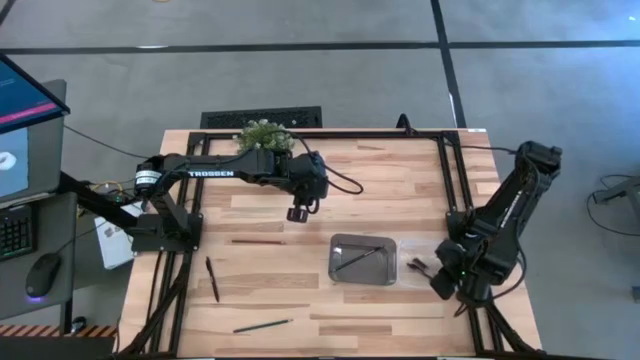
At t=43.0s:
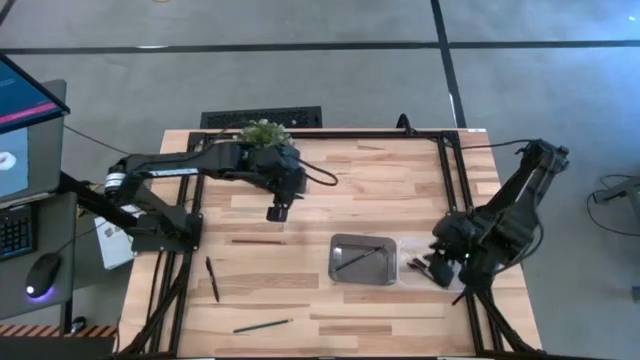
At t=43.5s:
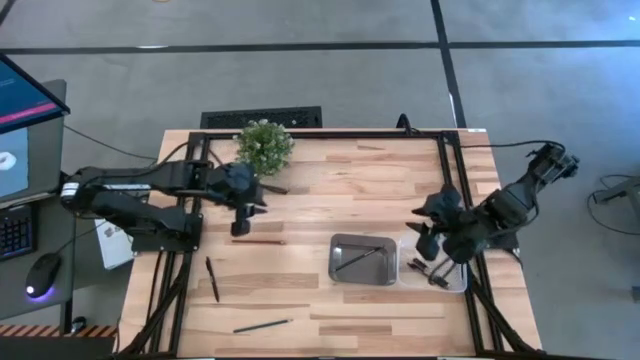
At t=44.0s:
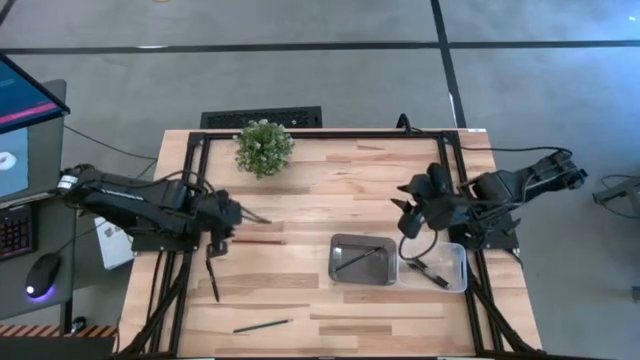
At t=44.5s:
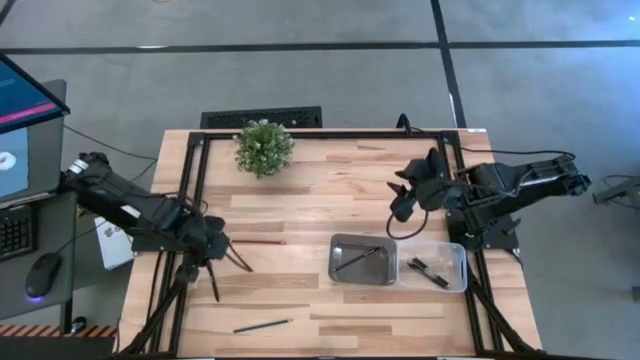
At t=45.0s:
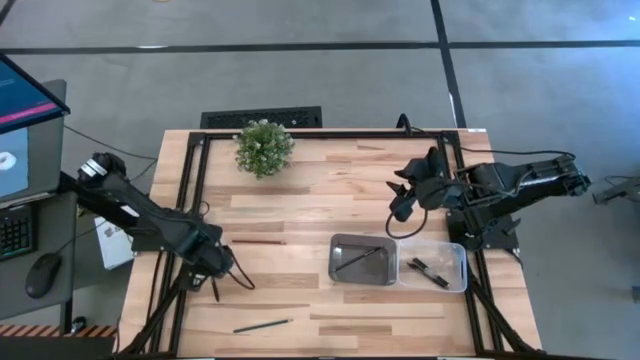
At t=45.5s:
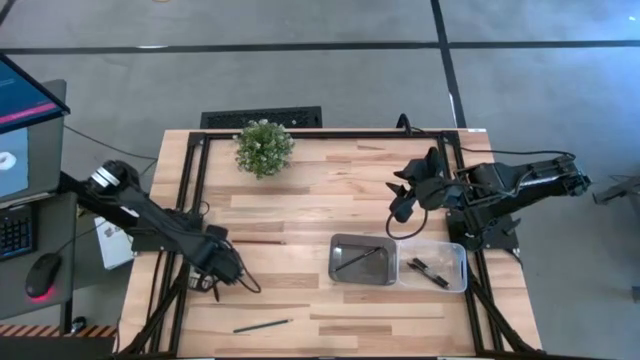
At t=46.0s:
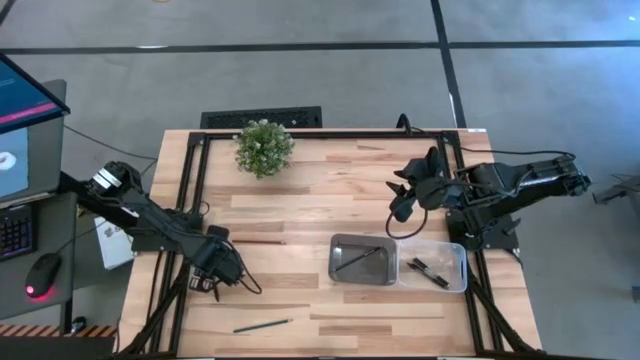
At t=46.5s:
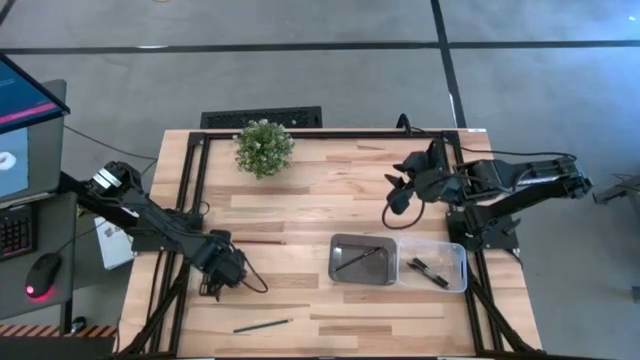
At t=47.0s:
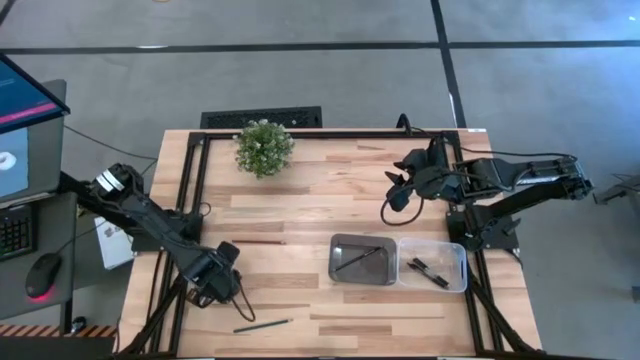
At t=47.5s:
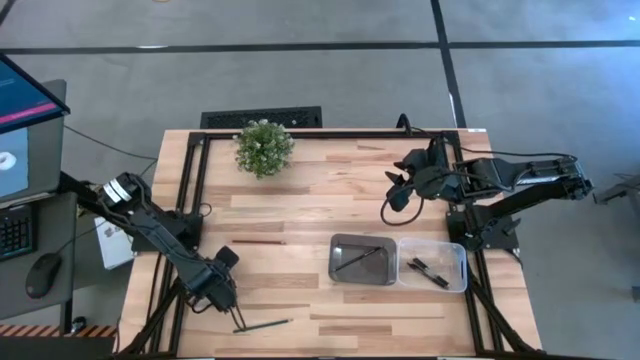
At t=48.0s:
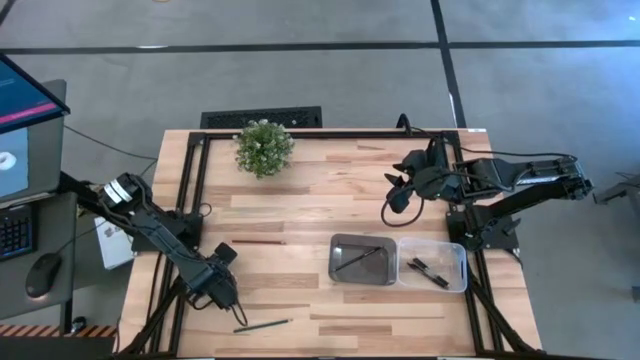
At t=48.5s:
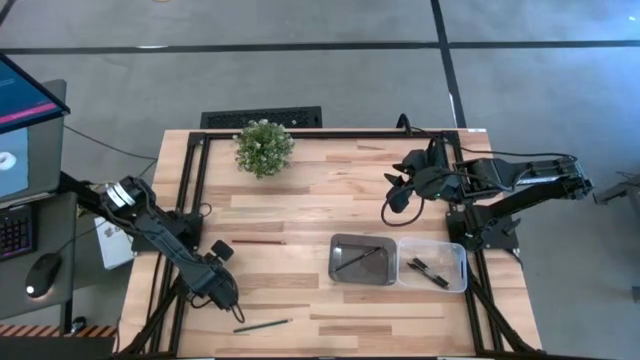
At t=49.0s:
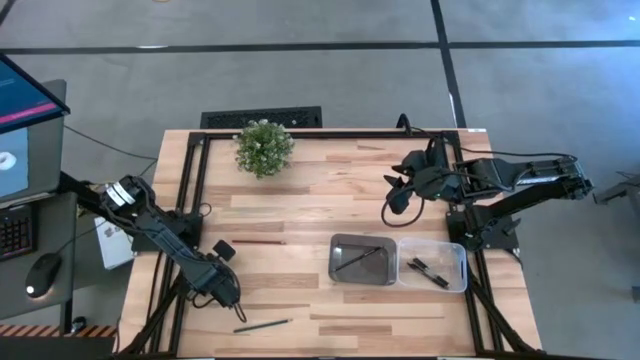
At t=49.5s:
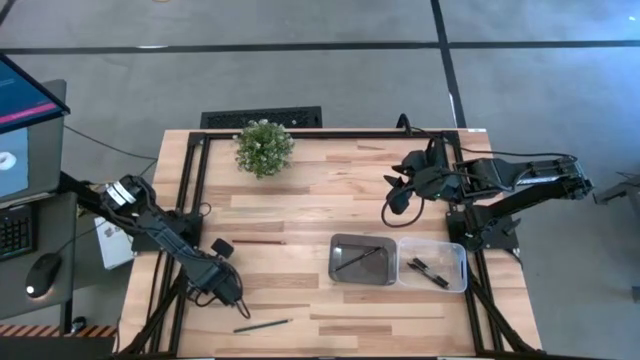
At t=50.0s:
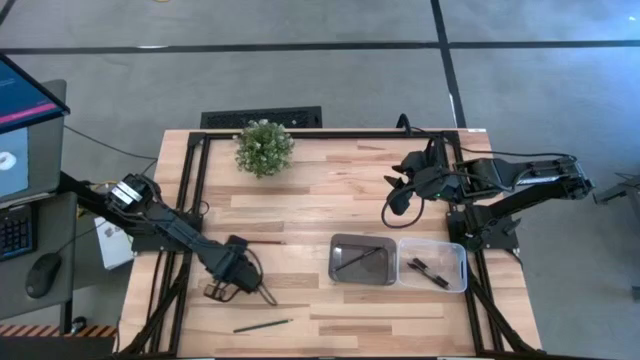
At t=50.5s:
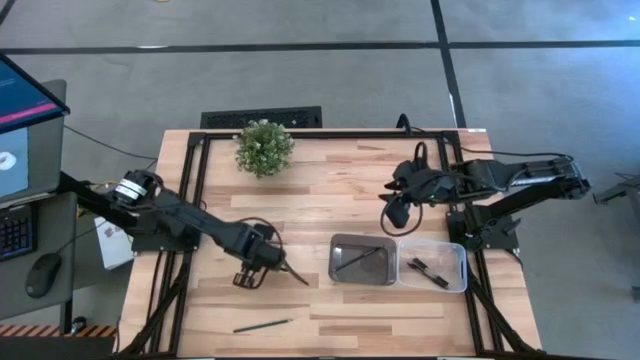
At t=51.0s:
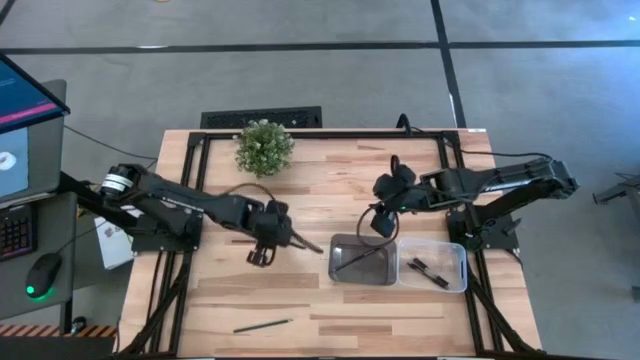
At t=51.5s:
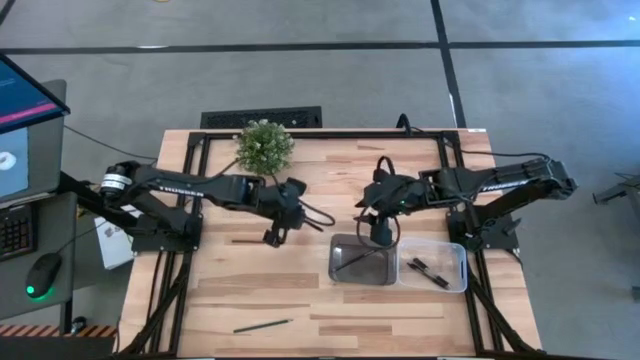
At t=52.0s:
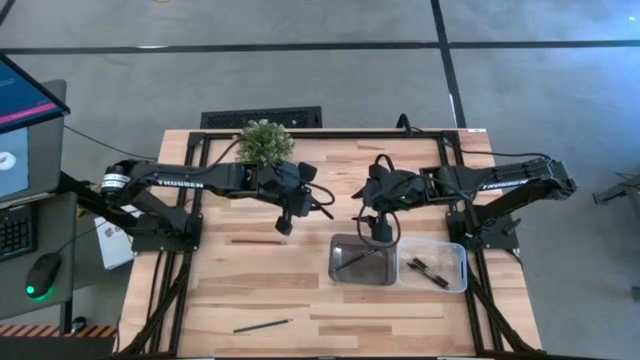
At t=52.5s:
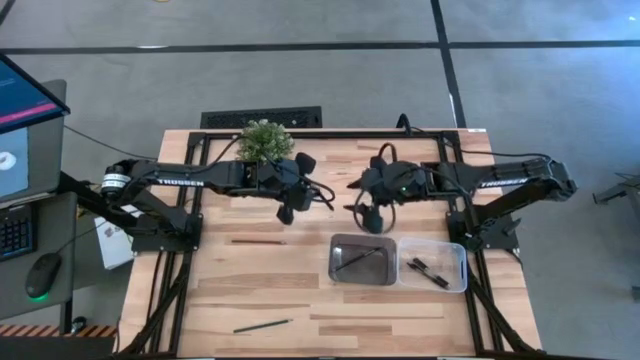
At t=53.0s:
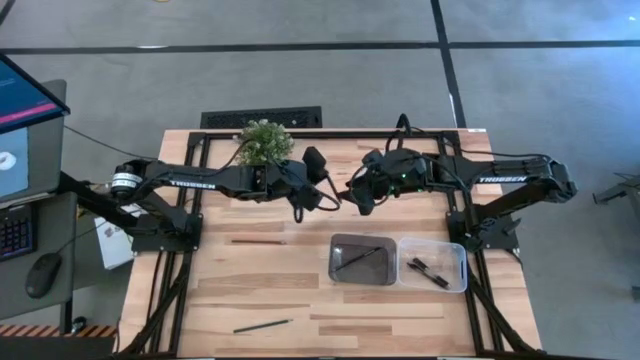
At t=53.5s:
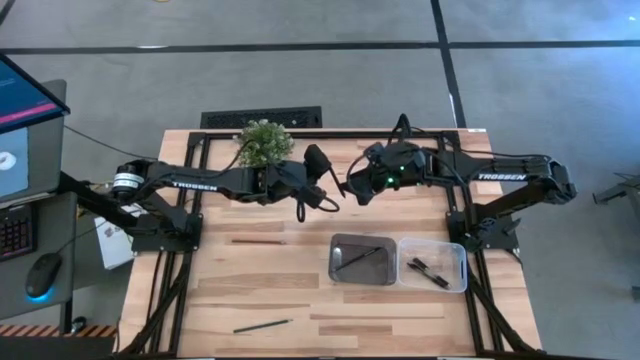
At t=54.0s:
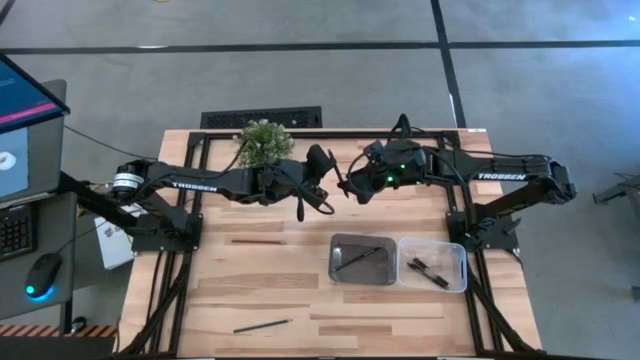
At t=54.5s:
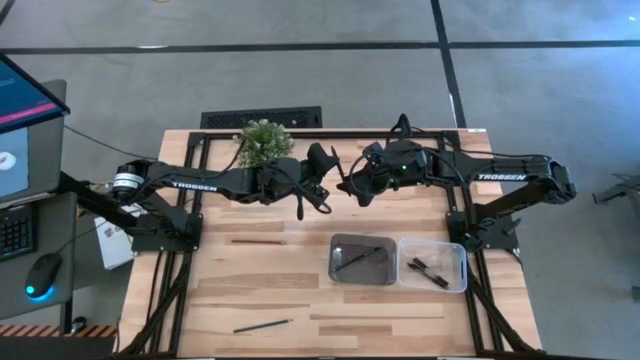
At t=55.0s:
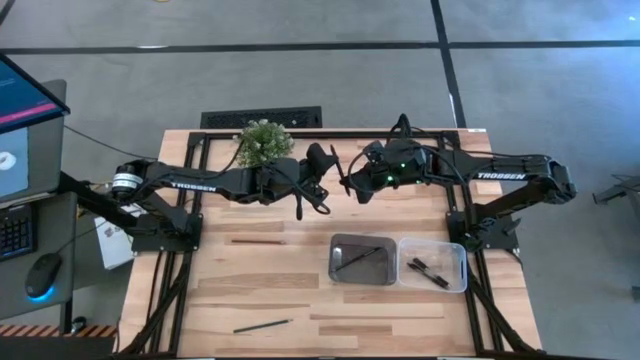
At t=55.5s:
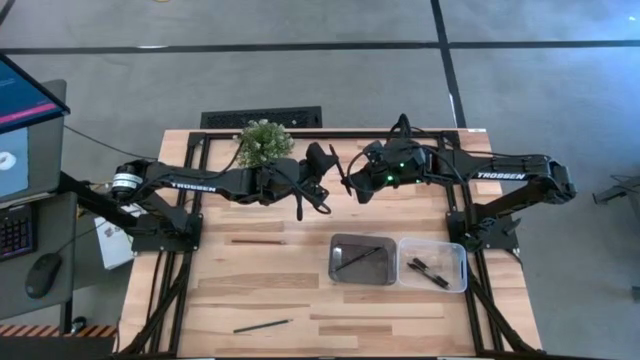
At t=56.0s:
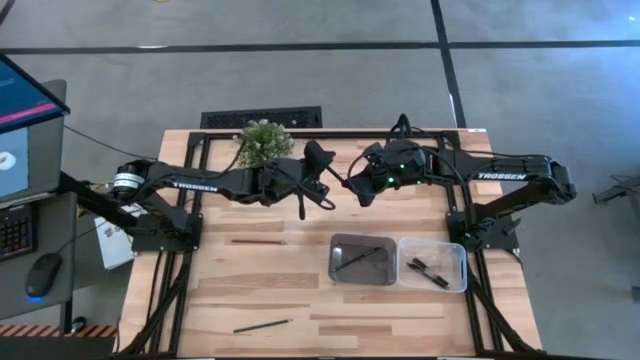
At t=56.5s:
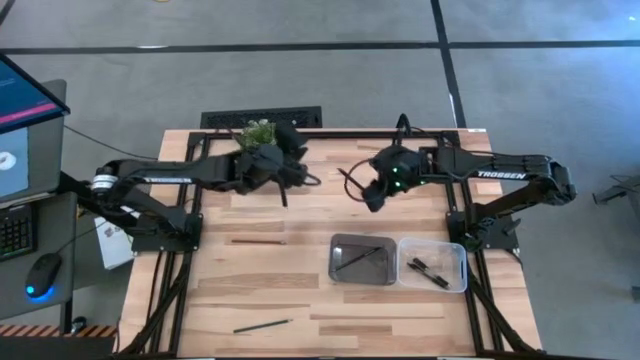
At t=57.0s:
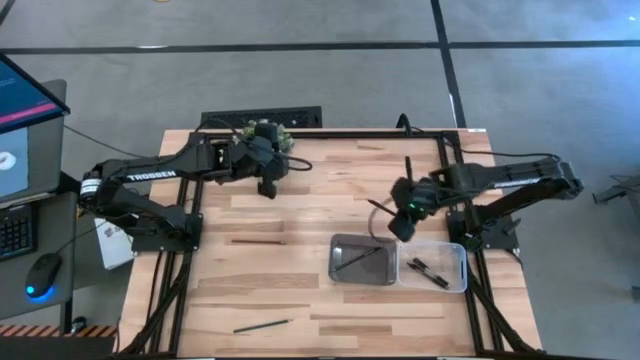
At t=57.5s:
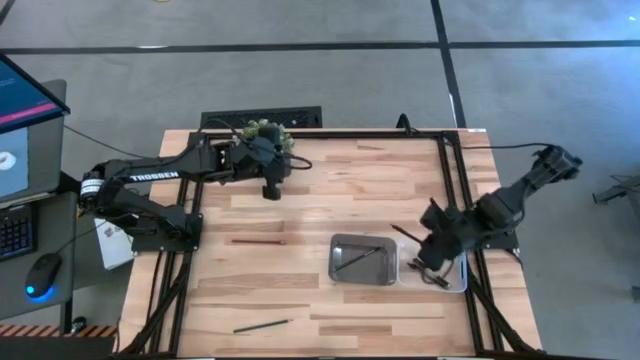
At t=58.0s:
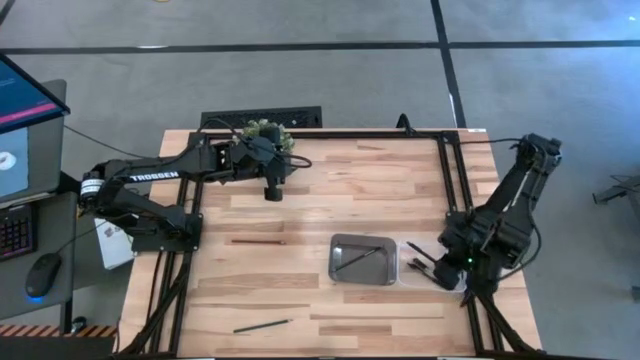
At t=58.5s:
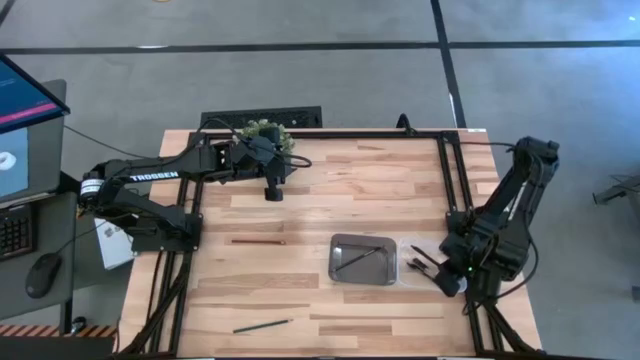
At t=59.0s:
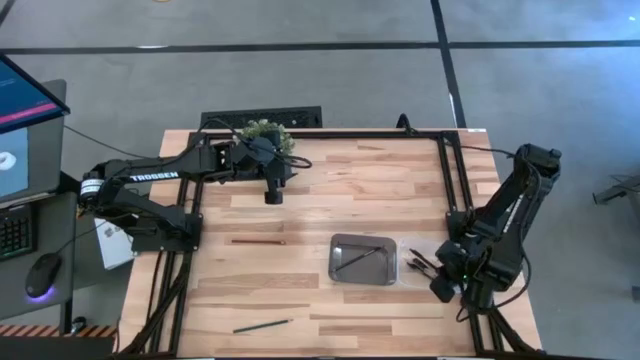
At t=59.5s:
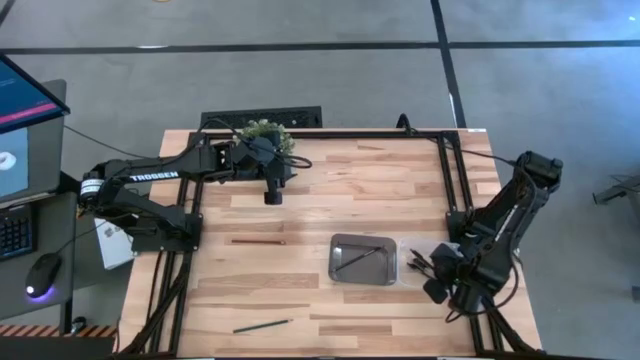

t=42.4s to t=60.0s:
Task: Sort pens & pencils
Put the black pen into the transparent bin

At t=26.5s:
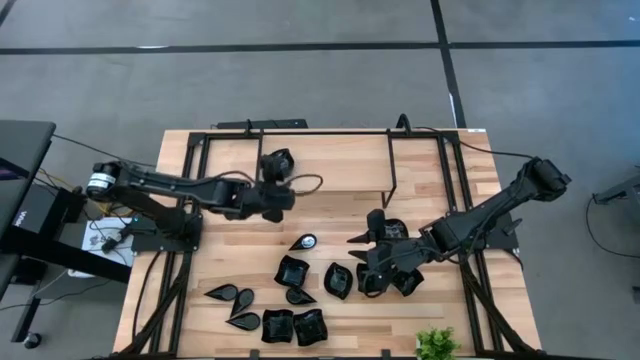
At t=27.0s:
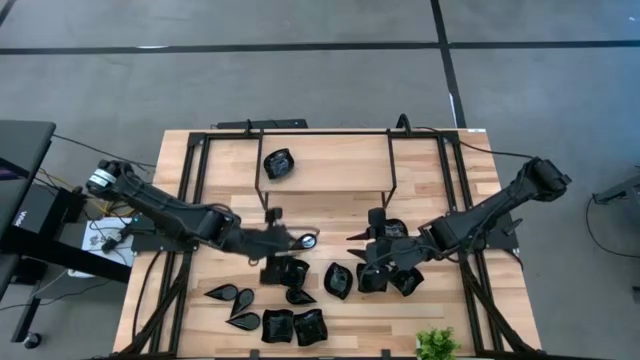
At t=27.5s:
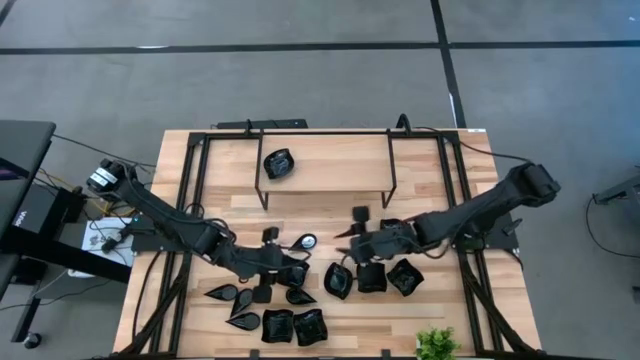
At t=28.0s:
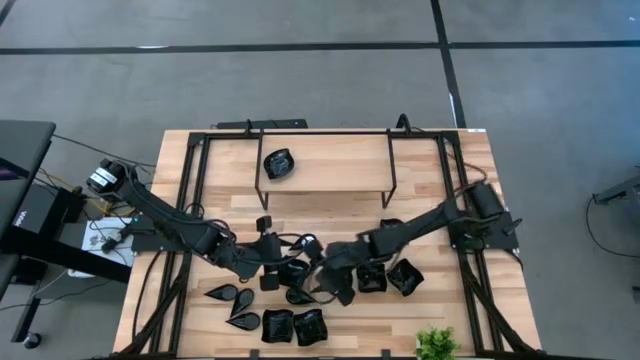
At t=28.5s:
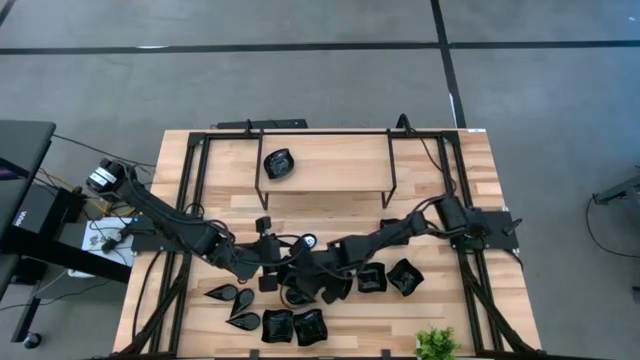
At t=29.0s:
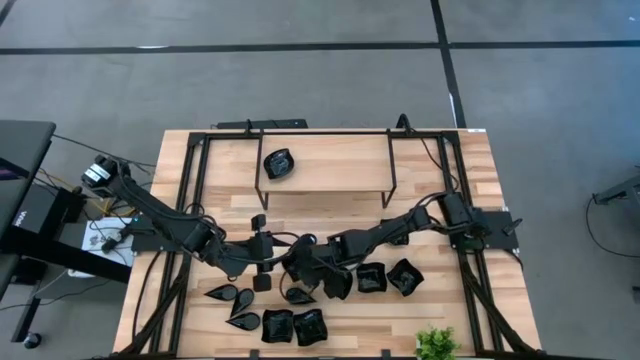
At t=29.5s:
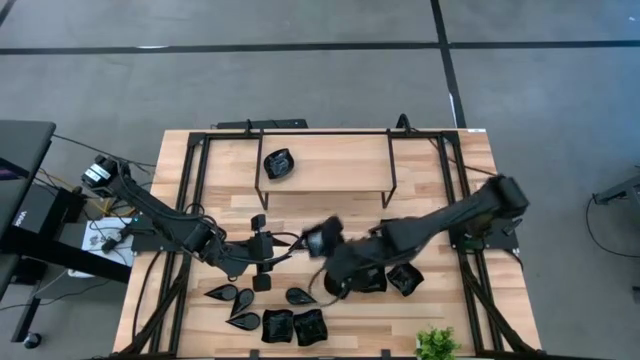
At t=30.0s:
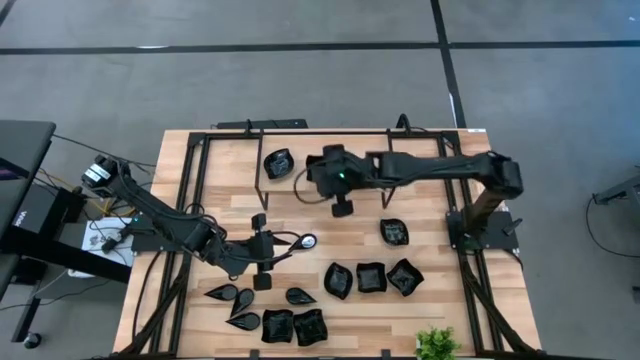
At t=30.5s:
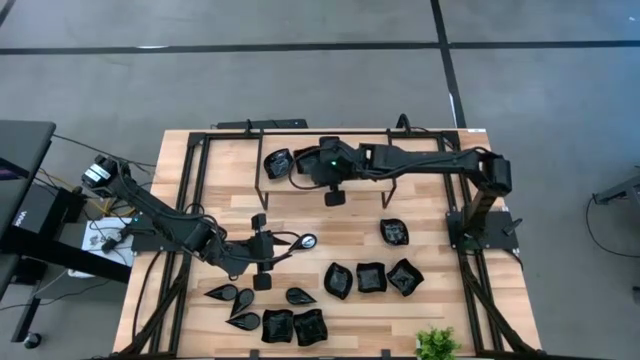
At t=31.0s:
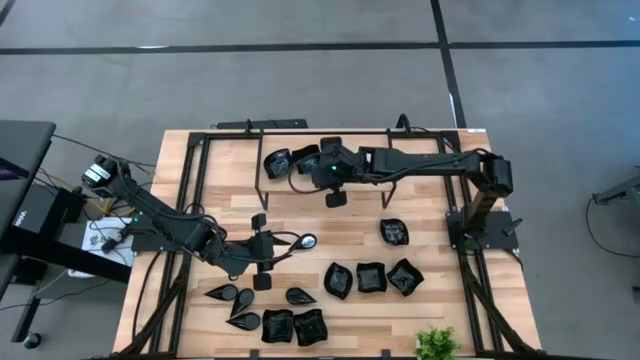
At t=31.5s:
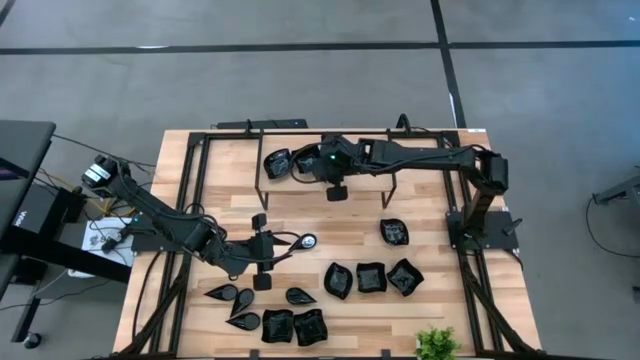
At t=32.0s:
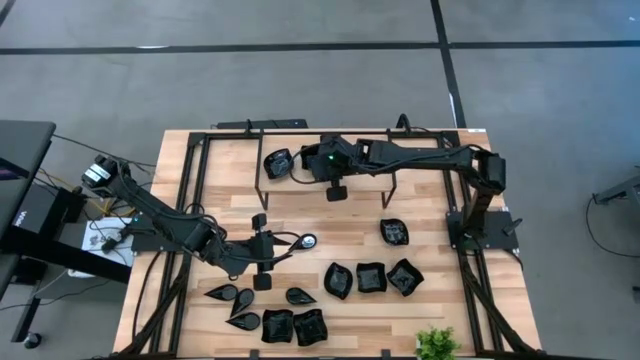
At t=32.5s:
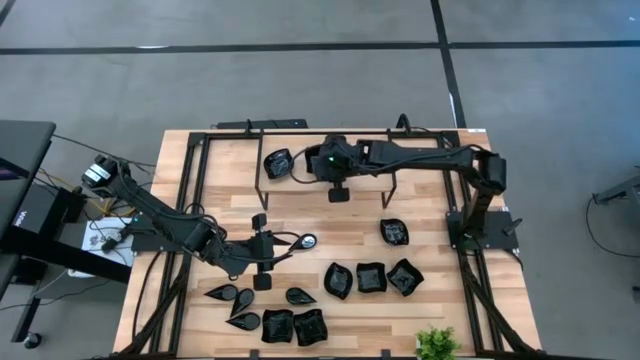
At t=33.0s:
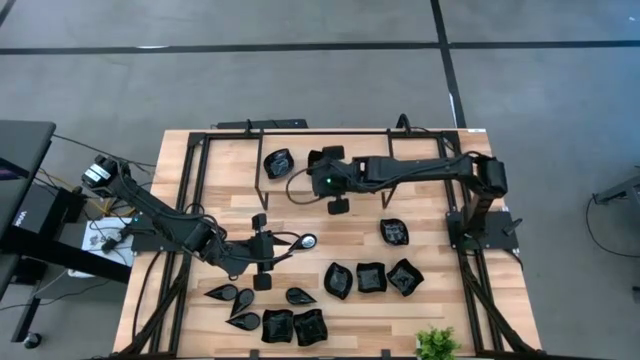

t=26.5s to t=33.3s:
Task: Pick & Place Mini shaped plates
Put the black distorted square plate on the shelf
